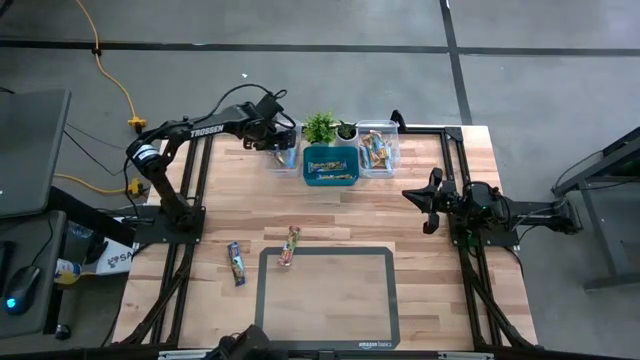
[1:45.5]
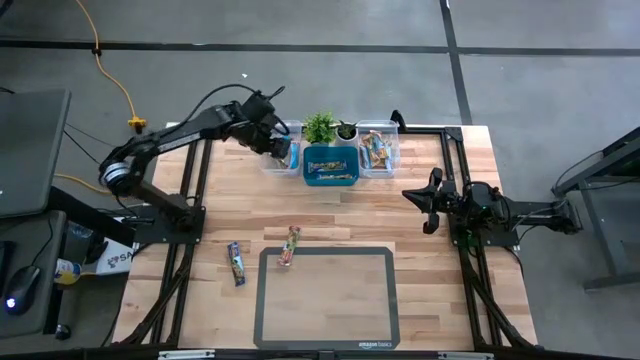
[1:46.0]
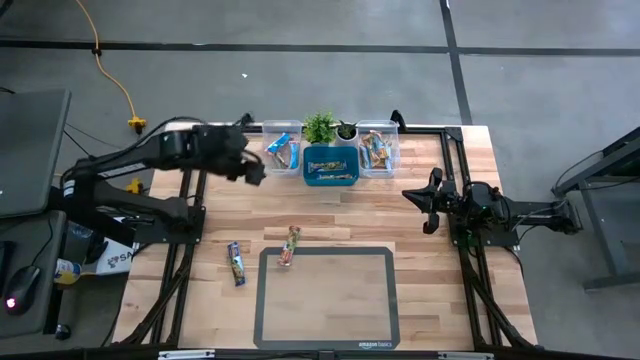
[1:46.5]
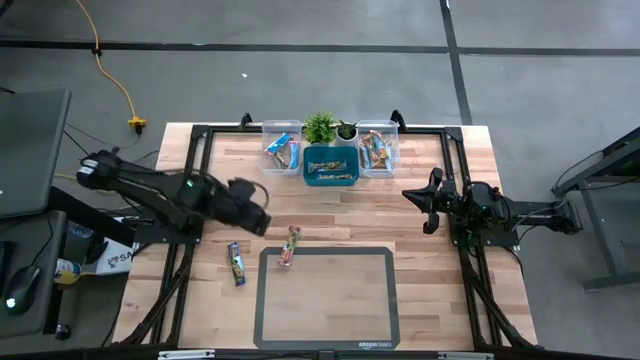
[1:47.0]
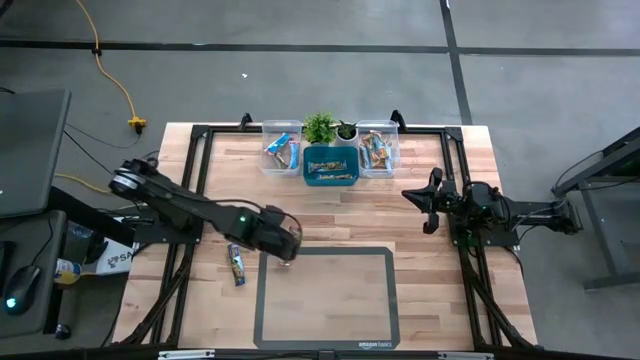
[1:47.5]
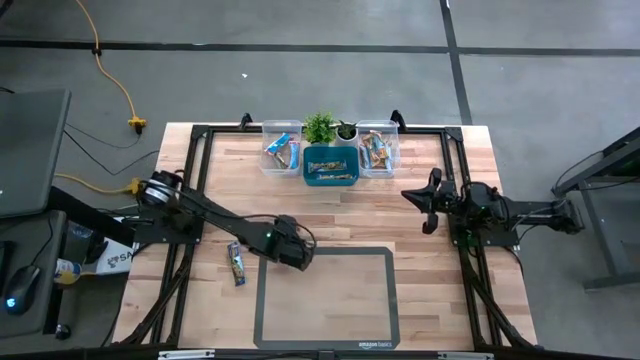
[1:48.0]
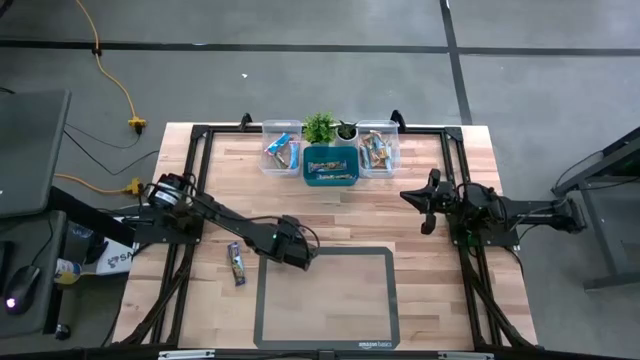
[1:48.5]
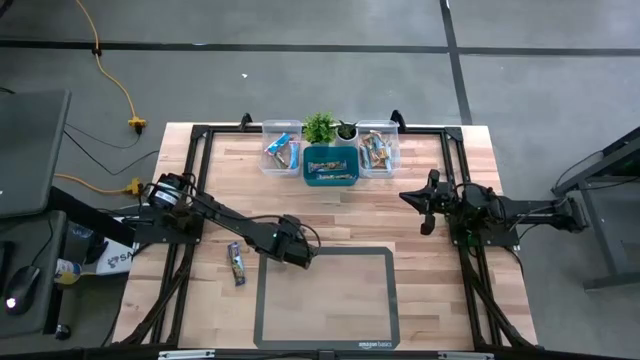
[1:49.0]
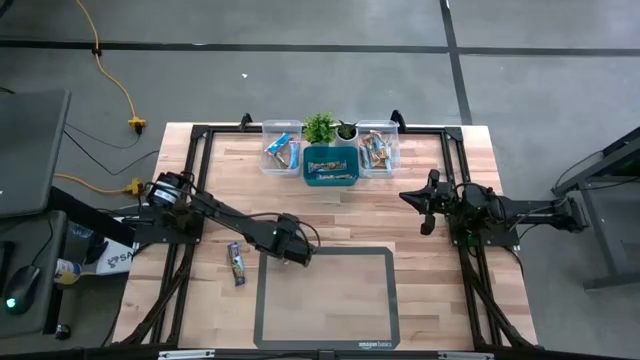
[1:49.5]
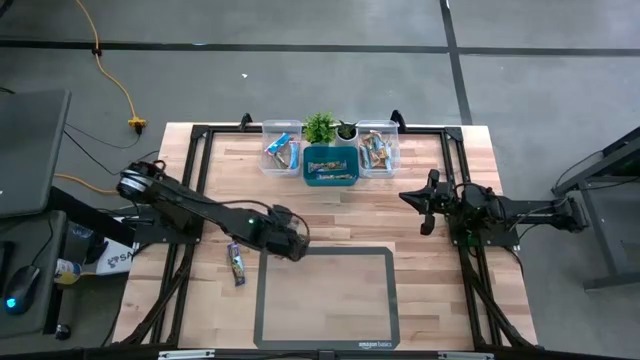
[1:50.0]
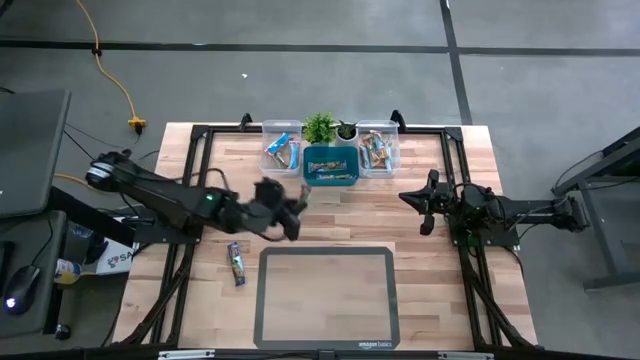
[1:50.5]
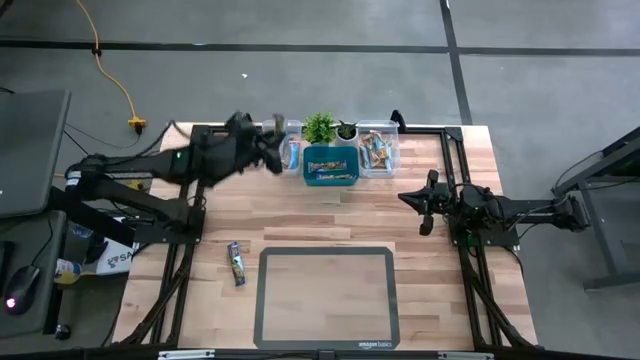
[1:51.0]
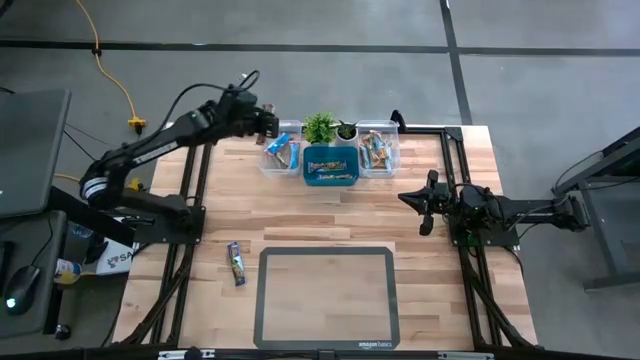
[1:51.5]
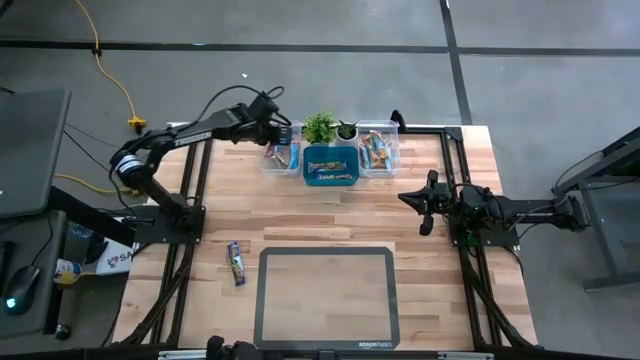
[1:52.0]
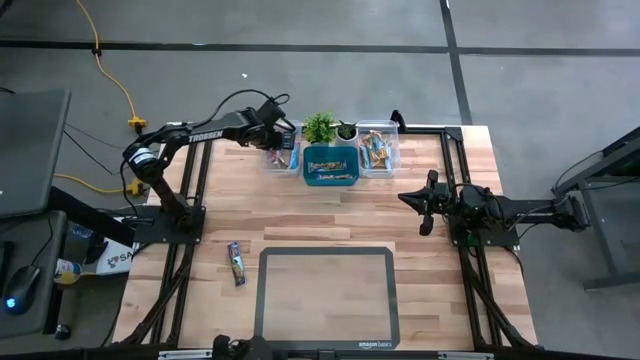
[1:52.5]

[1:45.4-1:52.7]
Task: Pick and place Granola Bars by type
Put the red granola bar into the left transparent bin

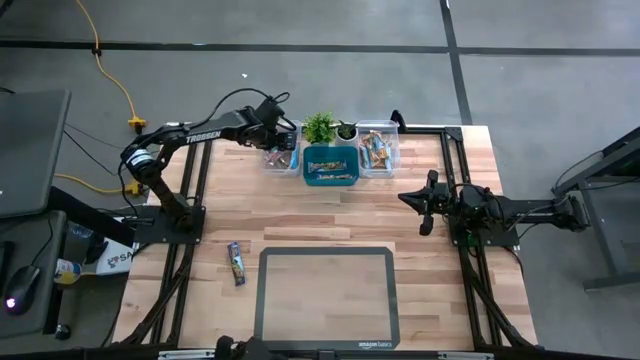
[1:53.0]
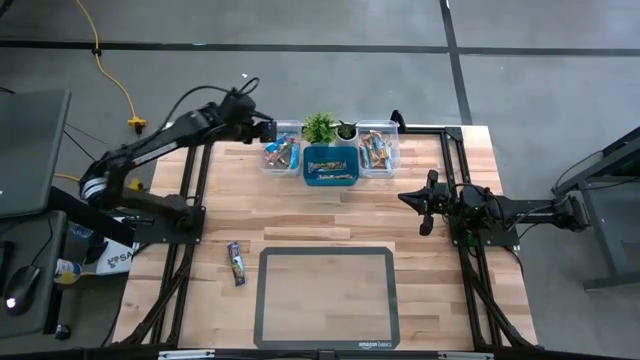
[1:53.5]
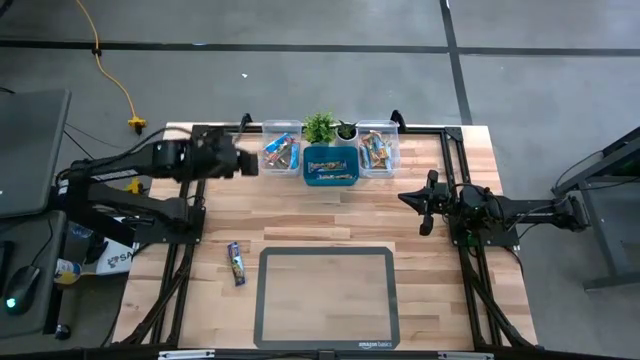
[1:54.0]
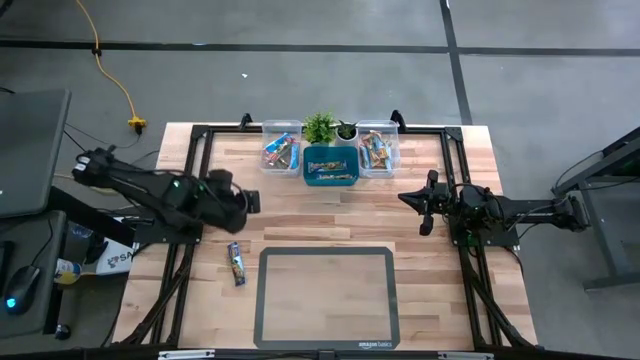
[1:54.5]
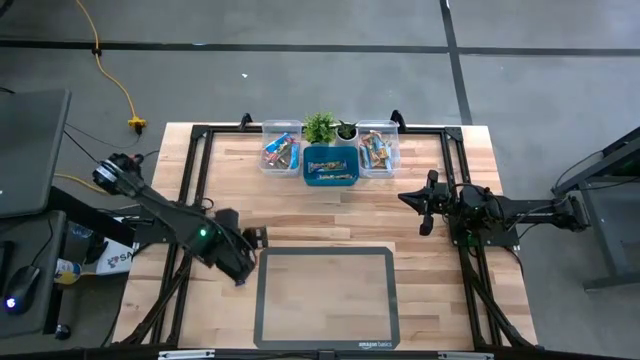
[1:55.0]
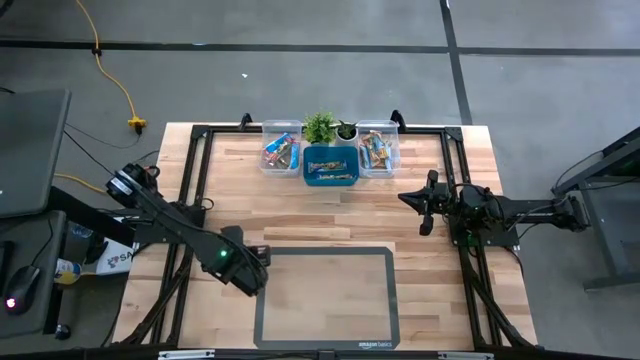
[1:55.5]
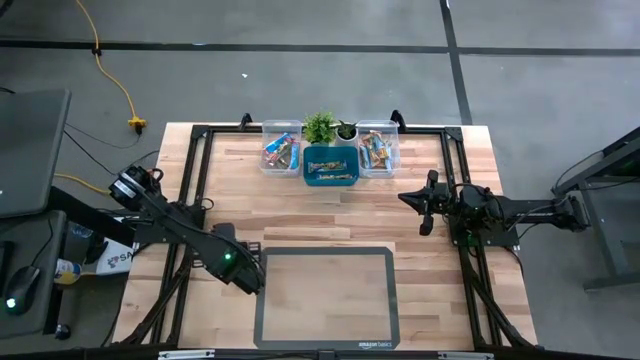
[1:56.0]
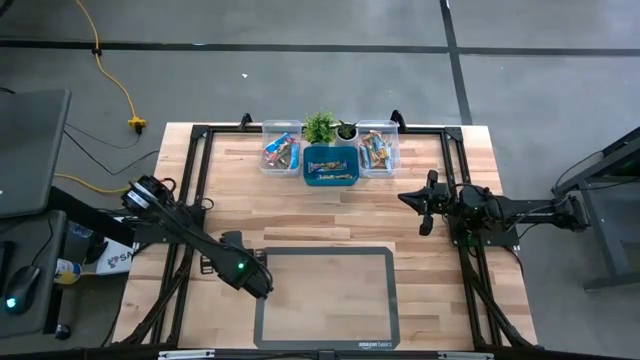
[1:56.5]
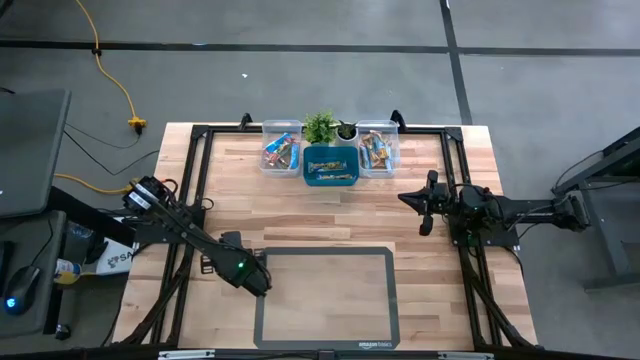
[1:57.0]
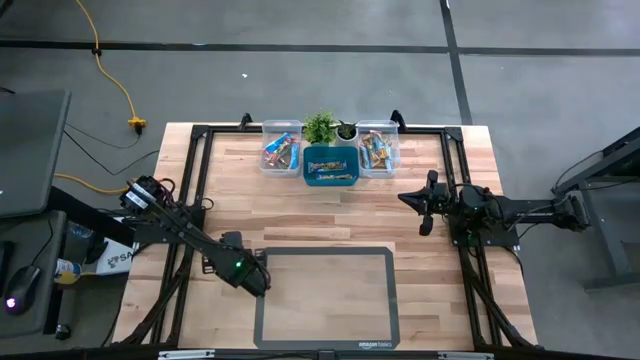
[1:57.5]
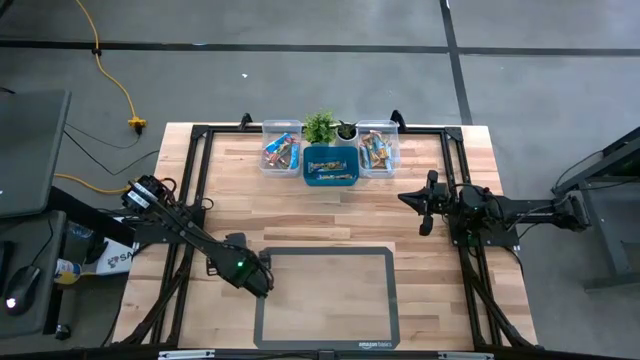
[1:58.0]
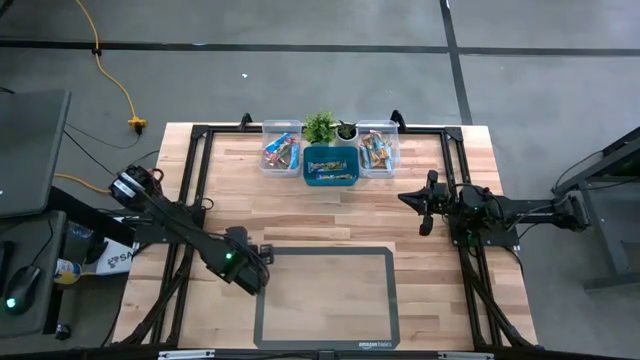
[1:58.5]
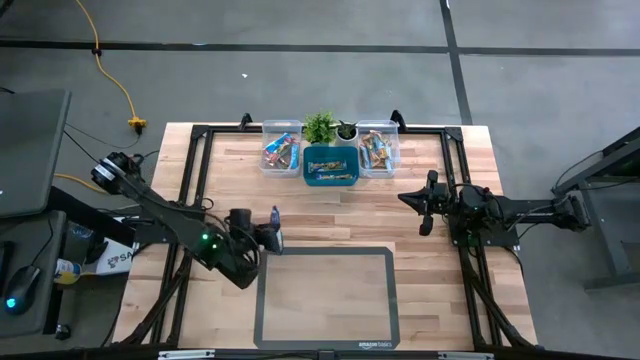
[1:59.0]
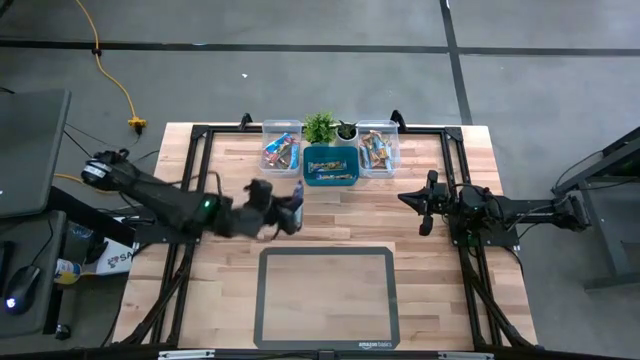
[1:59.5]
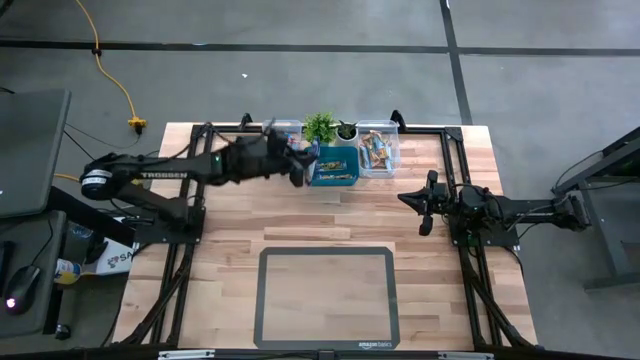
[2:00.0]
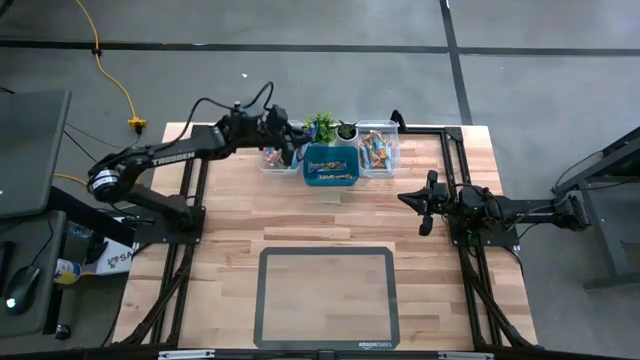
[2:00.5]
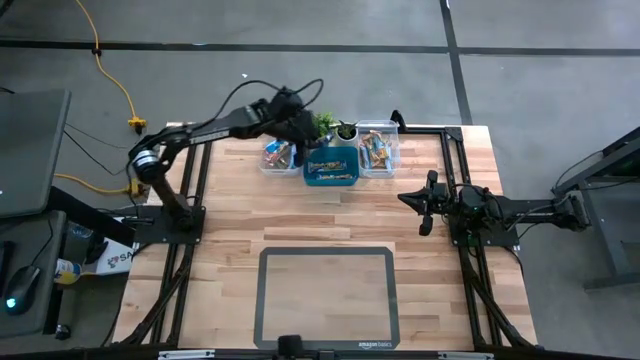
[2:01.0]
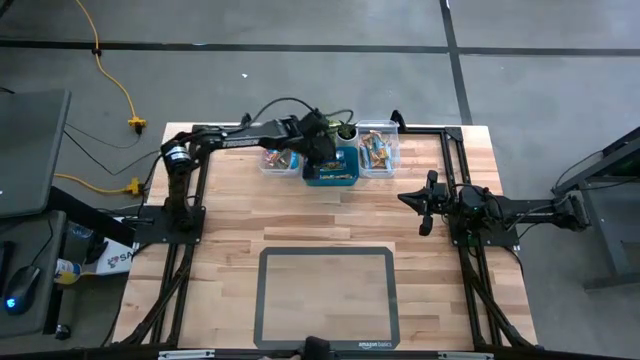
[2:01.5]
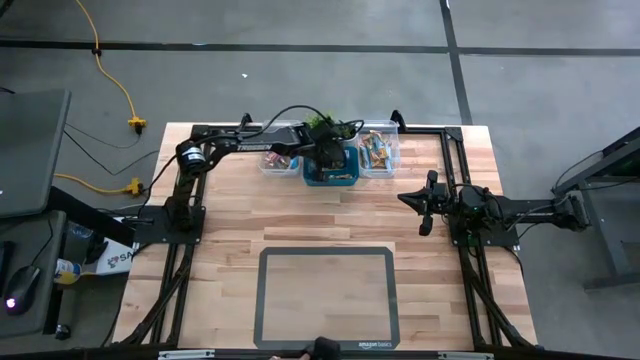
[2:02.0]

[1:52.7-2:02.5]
Put the blue granola bar into the blue bin

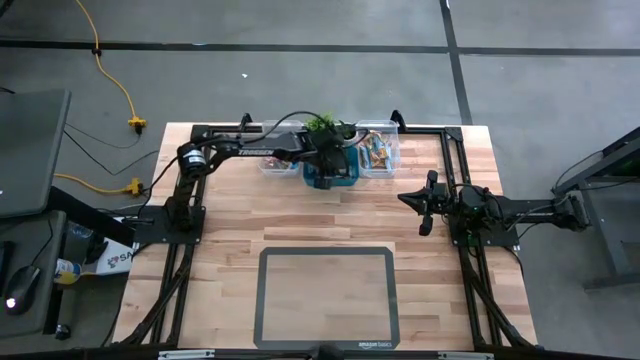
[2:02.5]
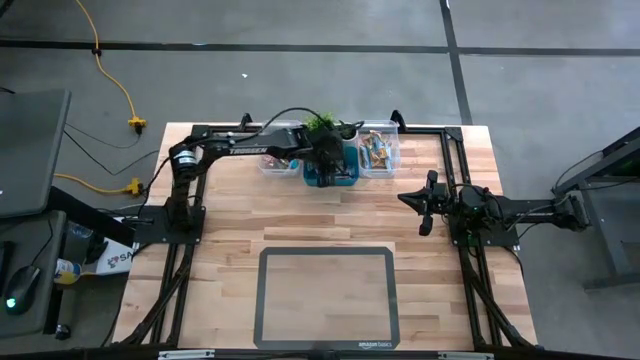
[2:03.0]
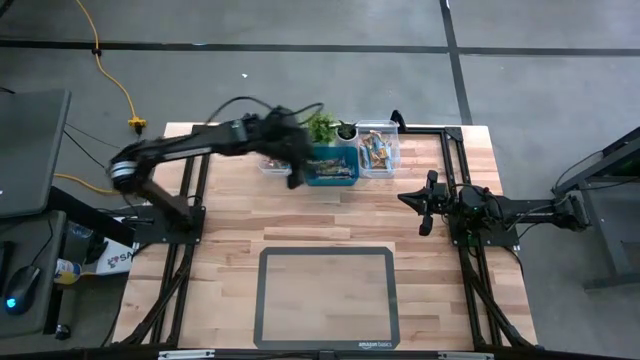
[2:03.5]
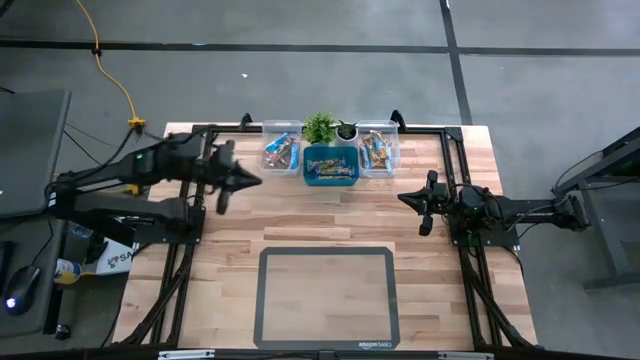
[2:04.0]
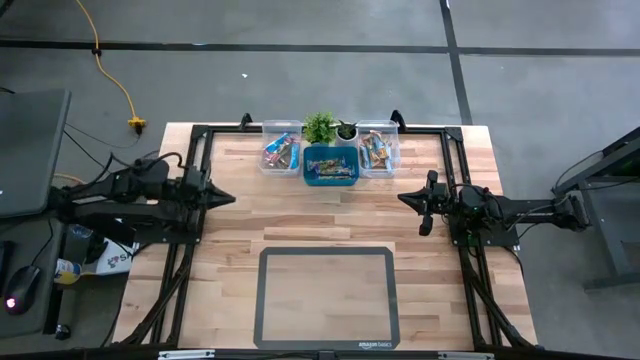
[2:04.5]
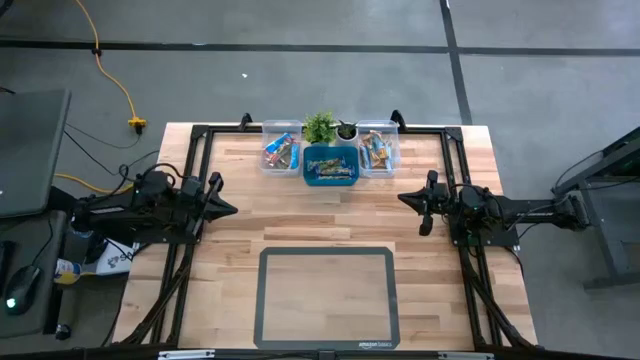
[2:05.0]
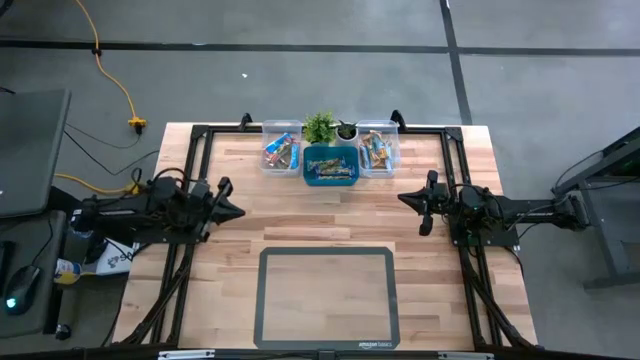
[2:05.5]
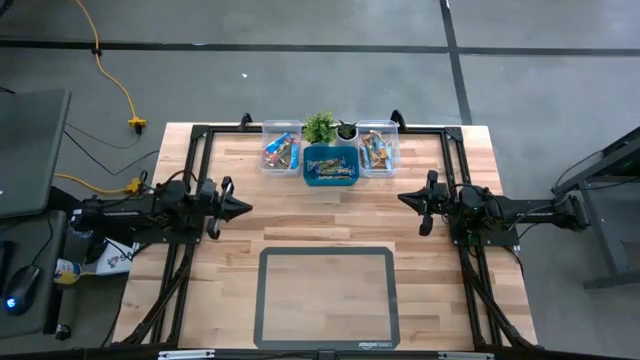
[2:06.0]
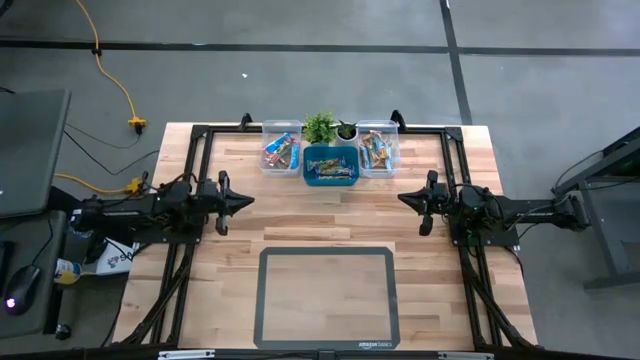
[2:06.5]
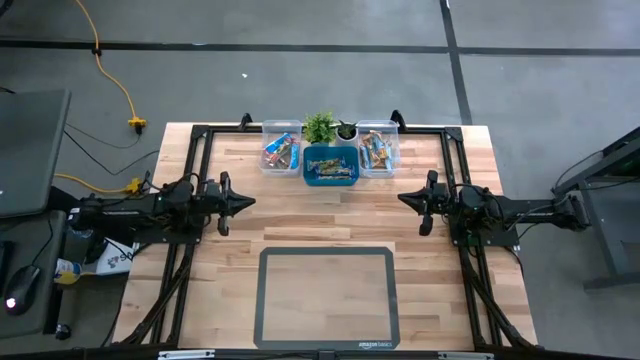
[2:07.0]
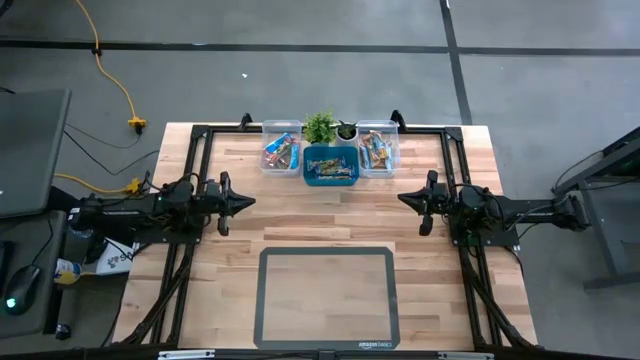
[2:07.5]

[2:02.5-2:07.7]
Return to Home Position
